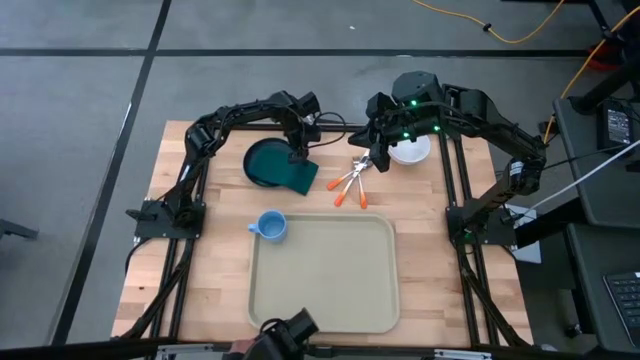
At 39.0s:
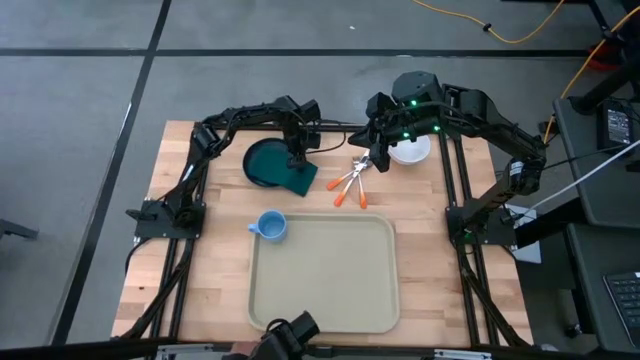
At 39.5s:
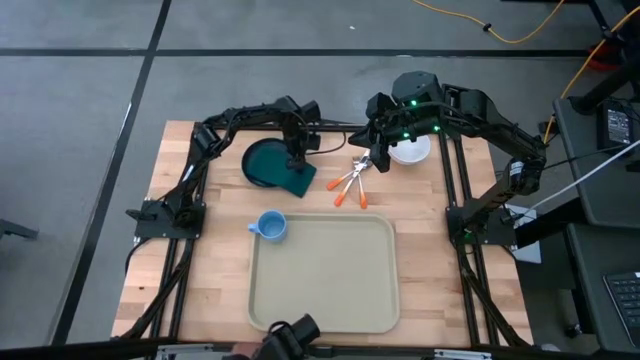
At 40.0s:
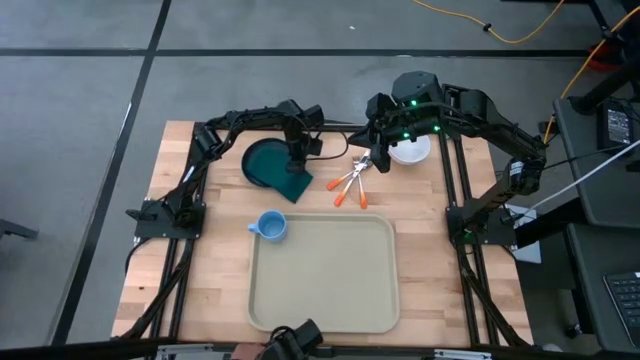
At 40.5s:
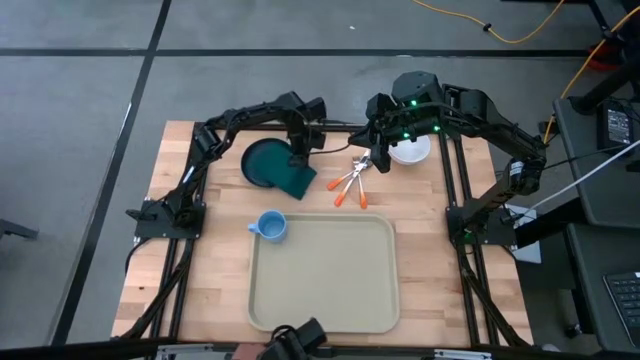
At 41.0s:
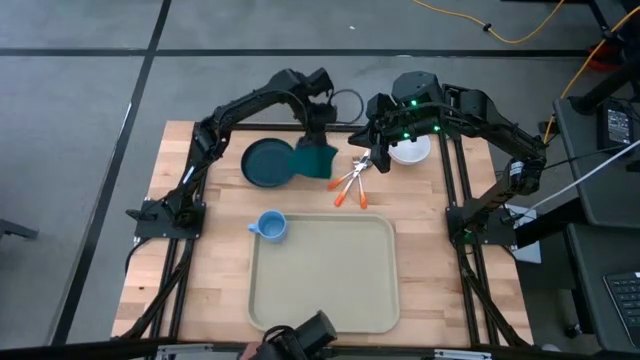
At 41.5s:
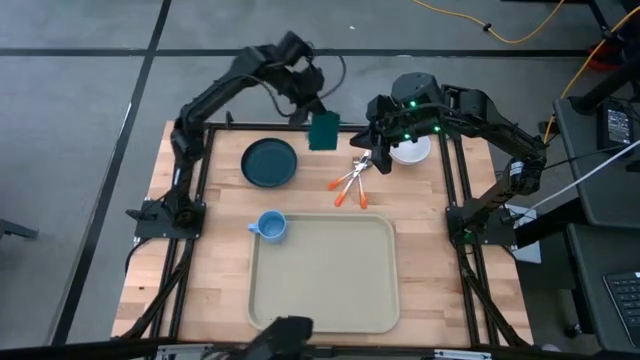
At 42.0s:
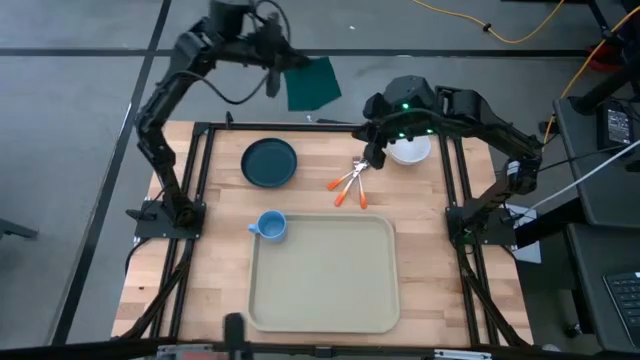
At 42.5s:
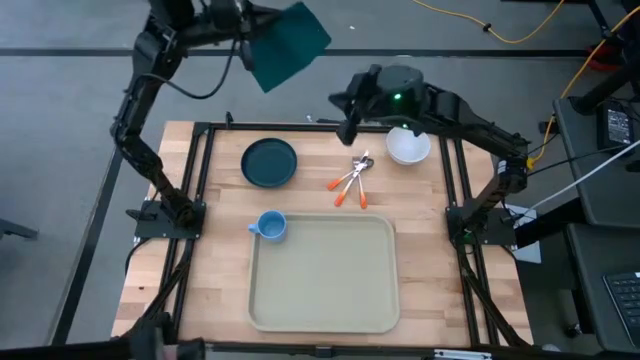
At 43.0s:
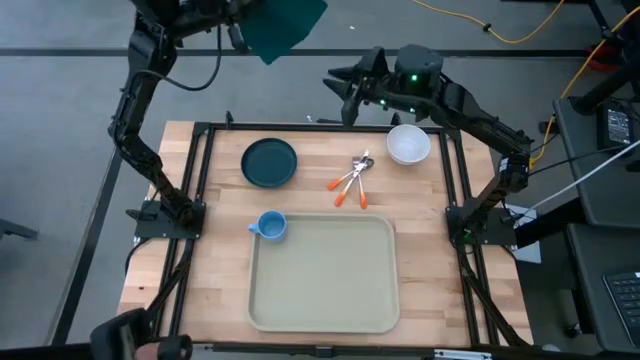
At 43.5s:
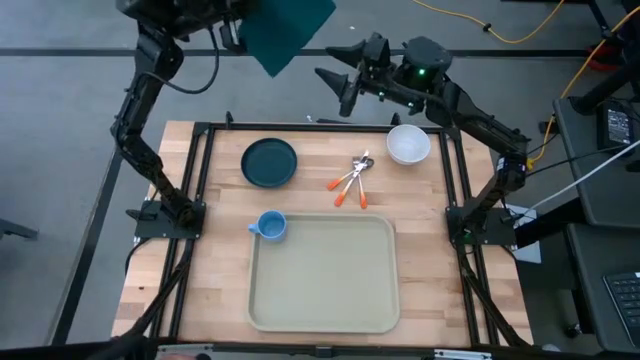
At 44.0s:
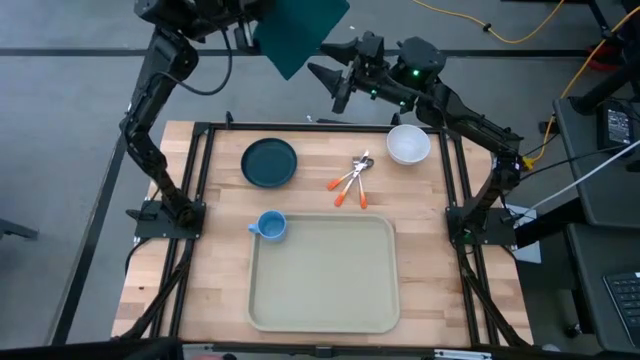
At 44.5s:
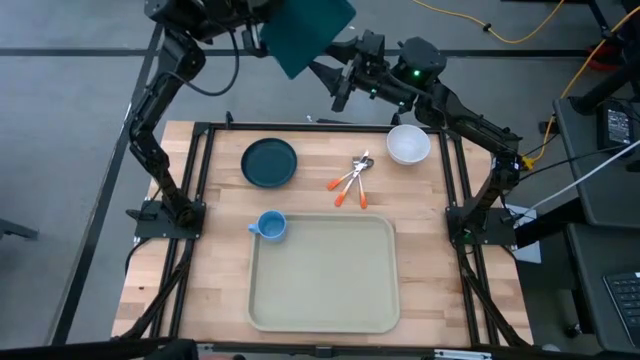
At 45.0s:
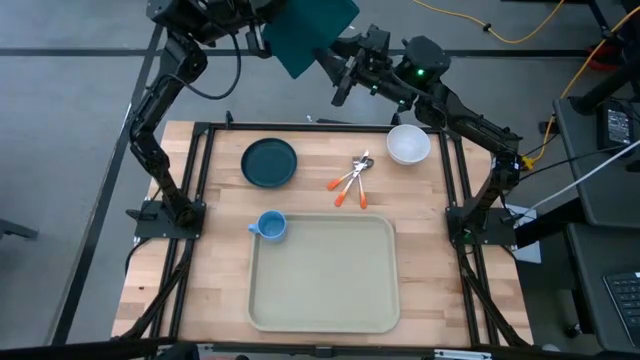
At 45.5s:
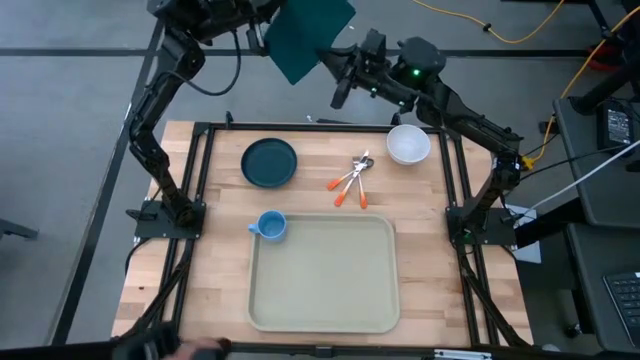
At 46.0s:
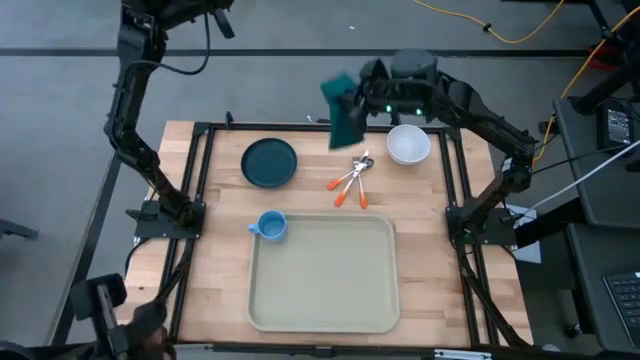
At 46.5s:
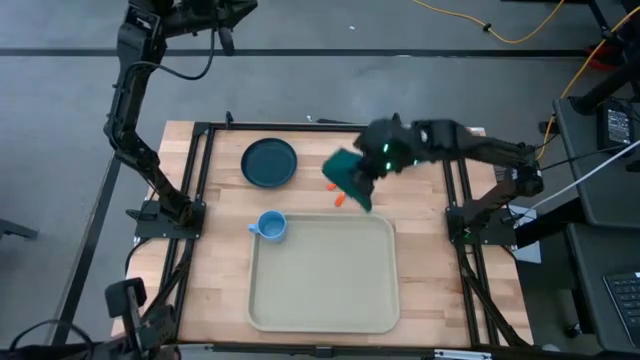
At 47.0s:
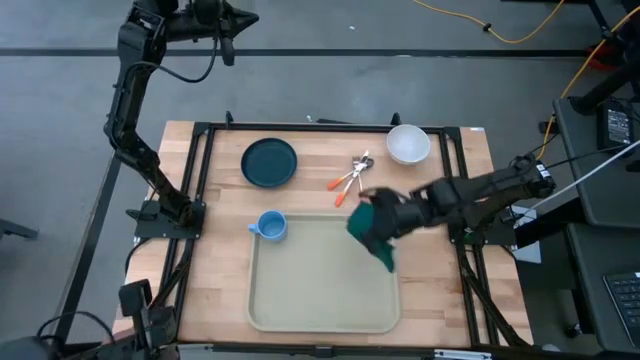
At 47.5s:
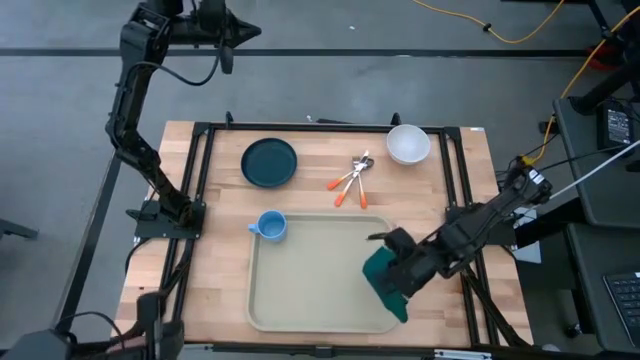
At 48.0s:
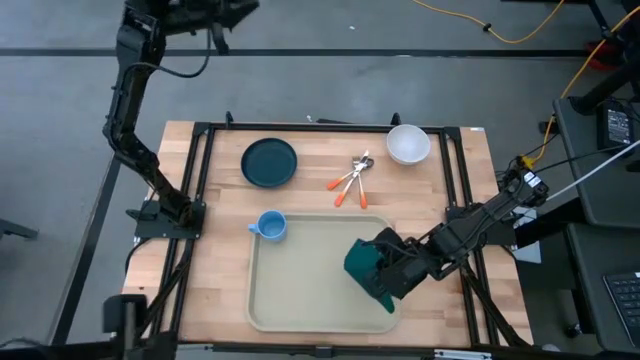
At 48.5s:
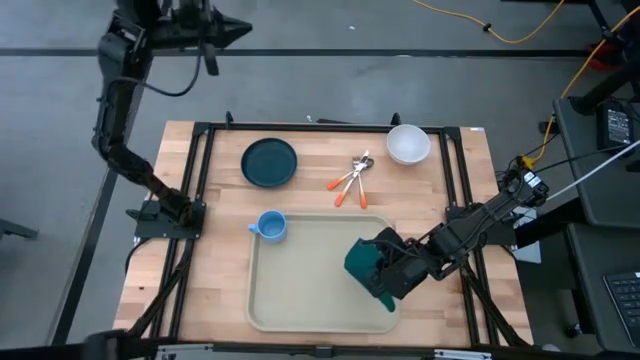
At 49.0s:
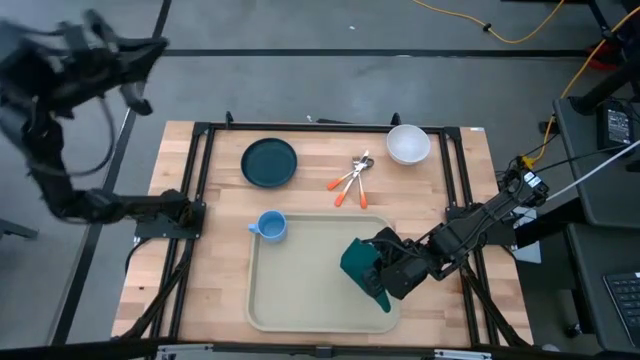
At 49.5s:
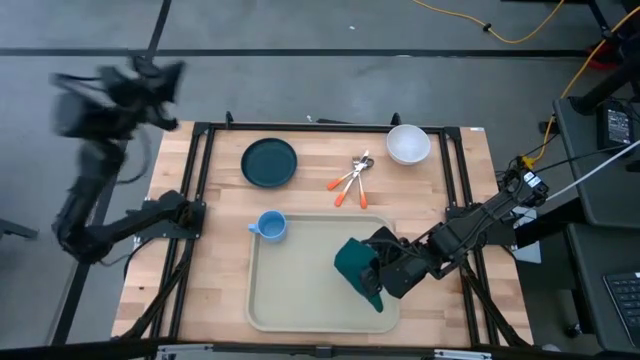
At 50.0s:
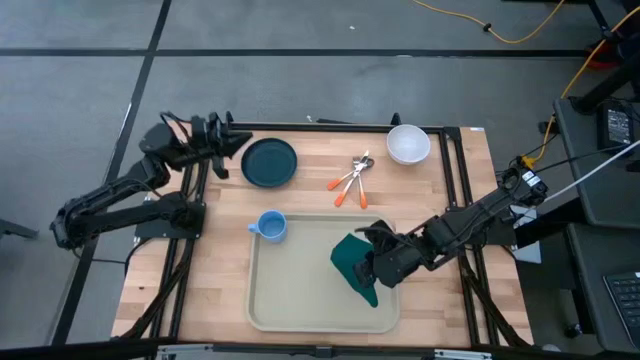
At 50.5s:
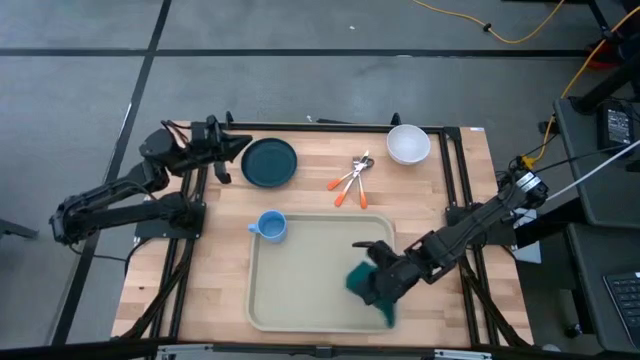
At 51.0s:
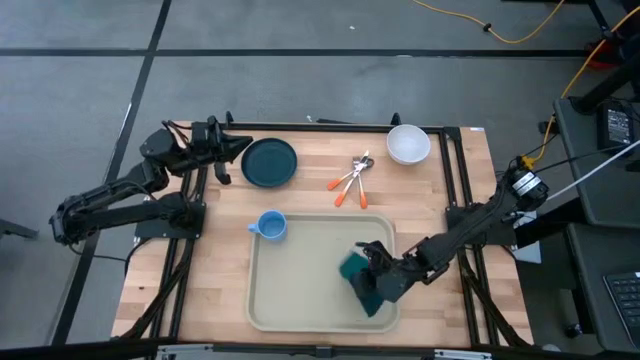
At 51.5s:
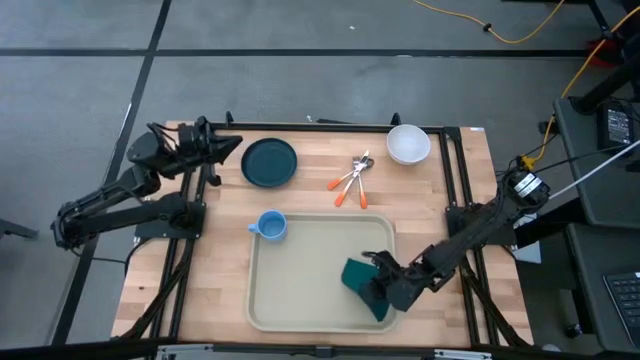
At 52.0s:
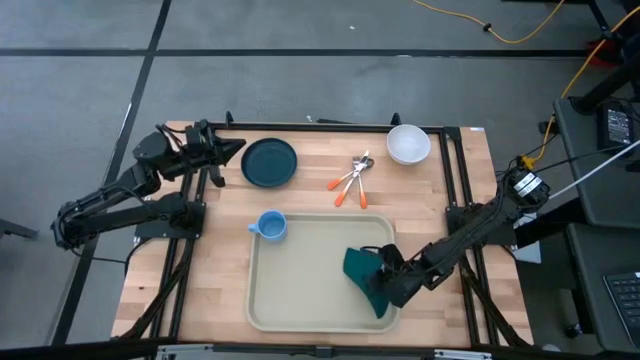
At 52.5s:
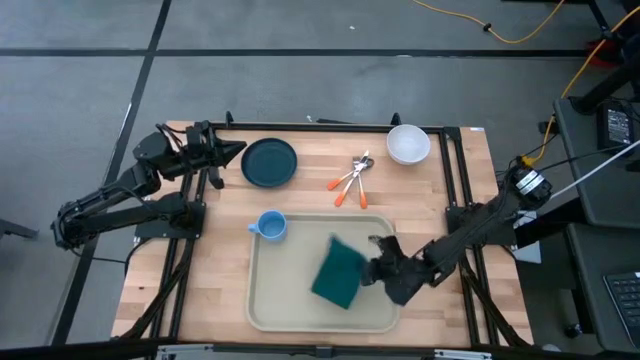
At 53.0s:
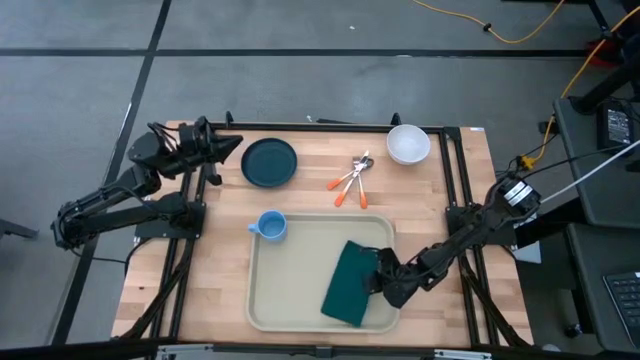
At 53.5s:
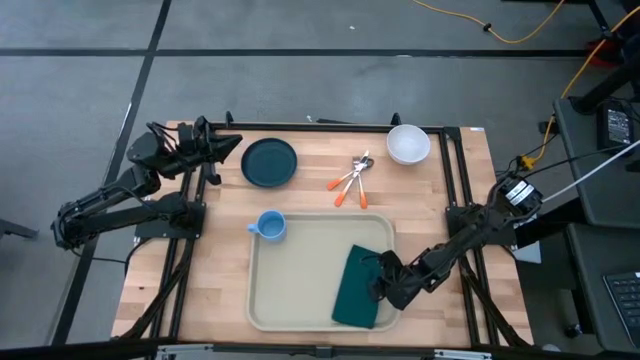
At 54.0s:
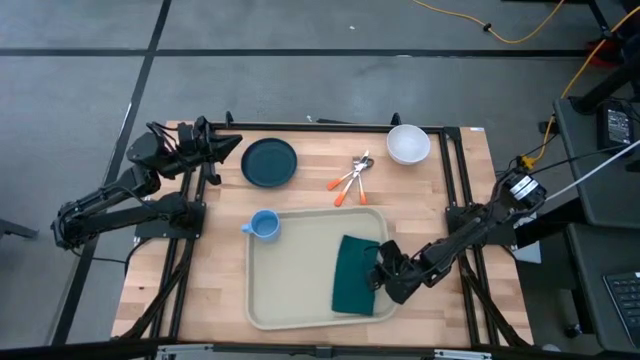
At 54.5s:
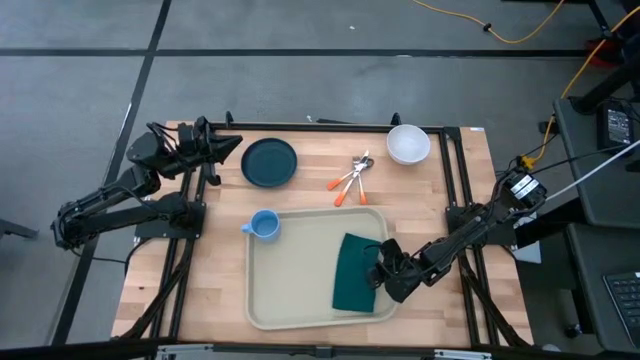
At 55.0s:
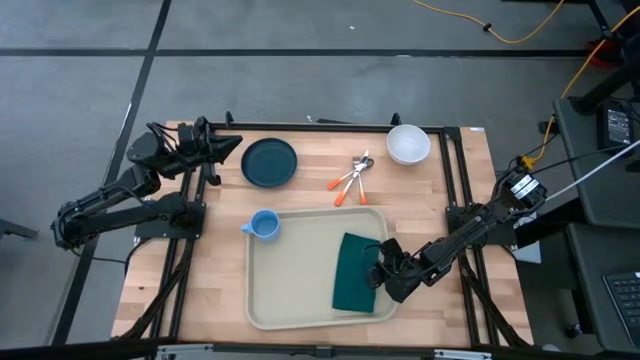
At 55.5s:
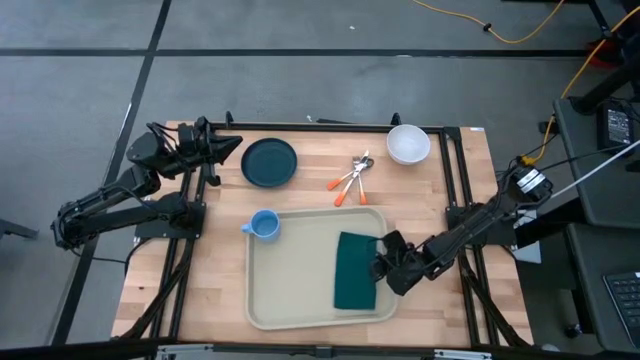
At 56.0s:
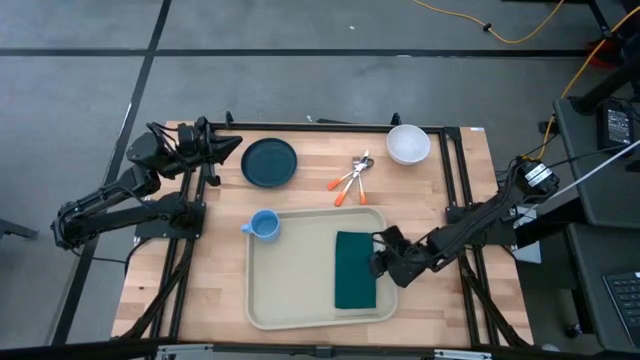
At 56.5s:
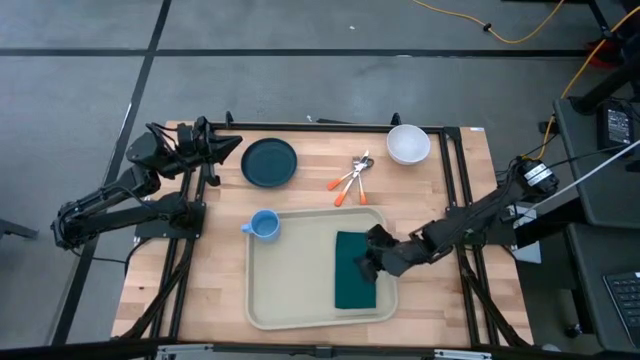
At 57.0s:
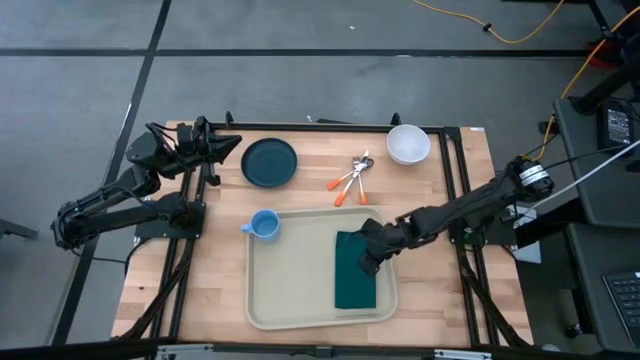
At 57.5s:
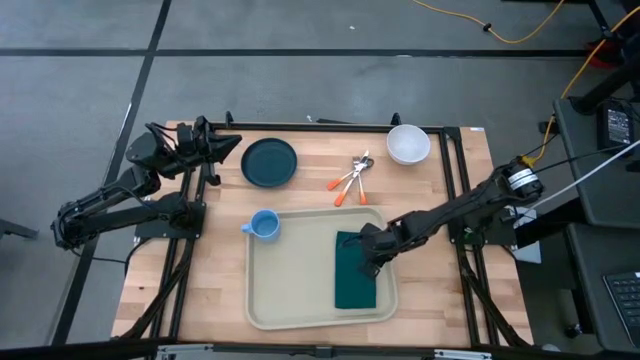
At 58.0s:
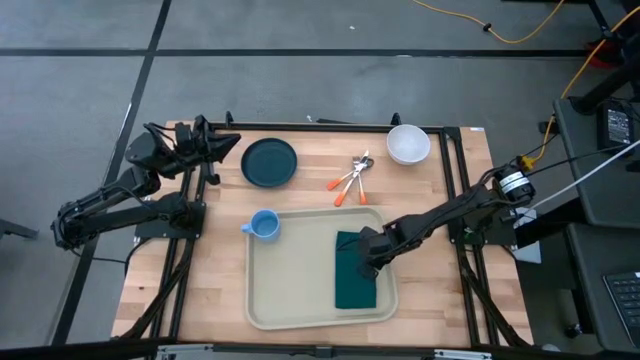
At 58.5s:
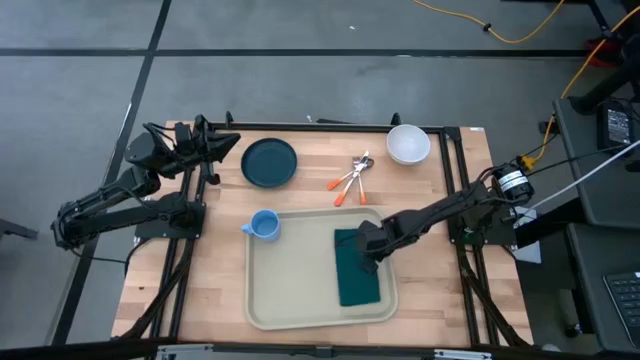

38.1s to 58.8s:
Task: Set up tray
Put the dark green napkin on the right of the light brown serving tray
